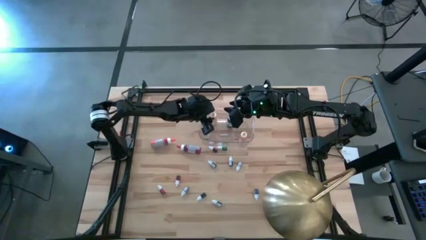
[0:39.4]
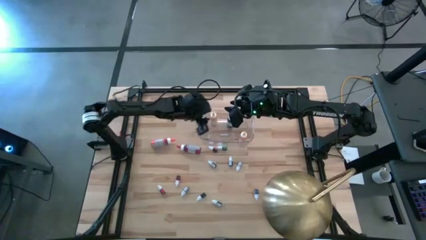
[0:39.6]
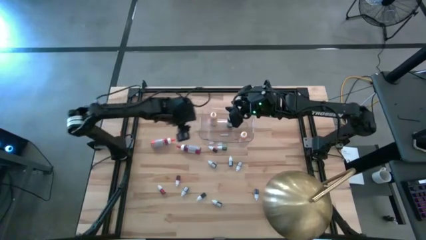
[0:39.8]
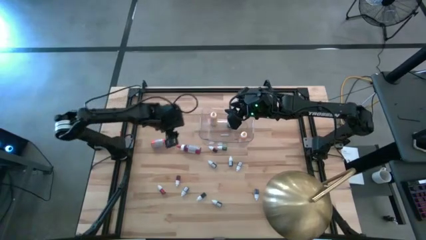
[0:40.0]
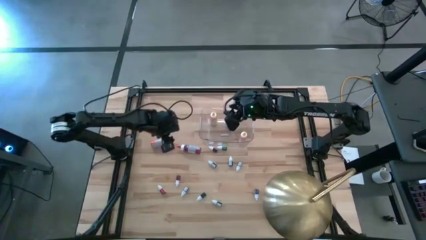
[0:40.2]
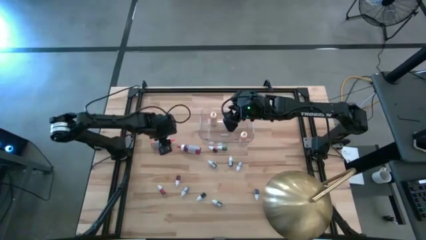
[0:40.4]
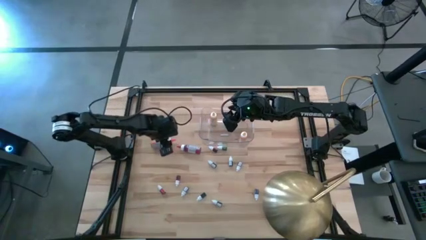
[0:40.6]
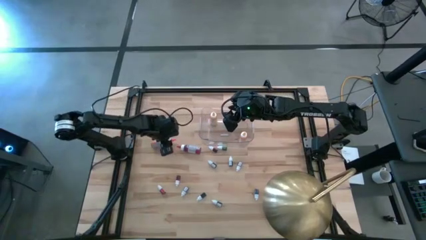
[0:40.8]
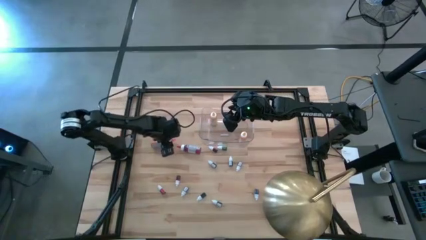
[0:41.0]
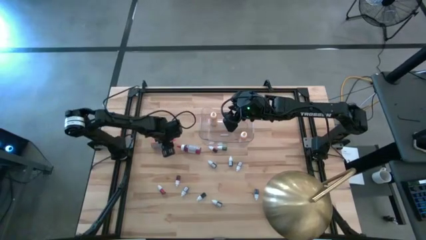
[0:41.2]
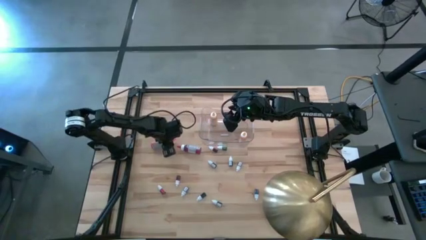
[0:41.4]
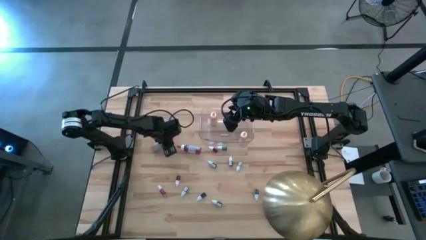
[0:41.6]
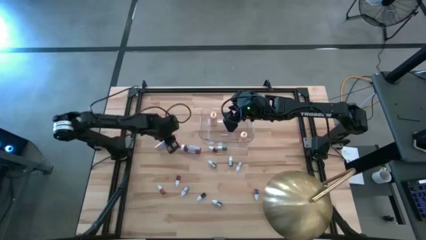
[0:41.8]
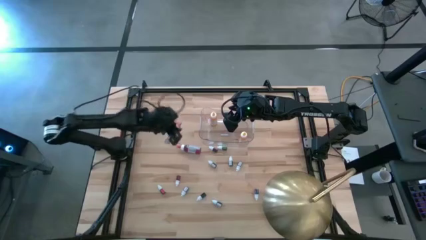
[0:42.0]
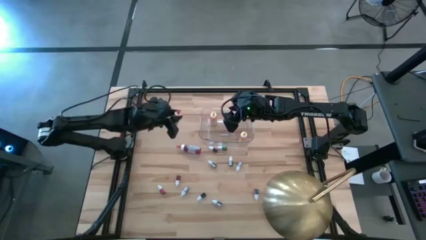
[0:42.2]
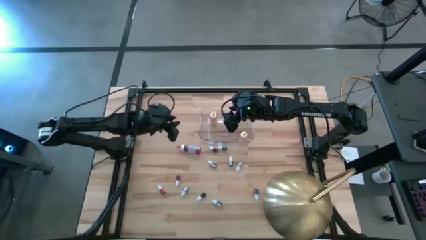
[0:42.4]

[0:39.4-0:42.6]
Task: Pick & Place food coloring
Put the large orange food coloring bottle in the transparent bin

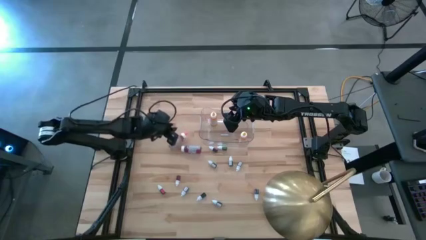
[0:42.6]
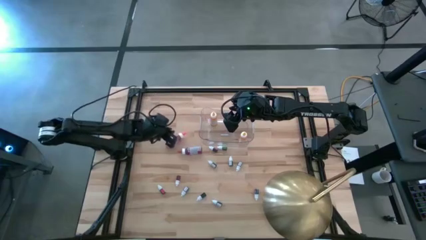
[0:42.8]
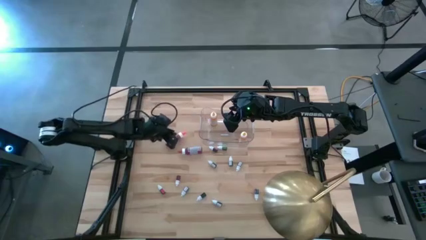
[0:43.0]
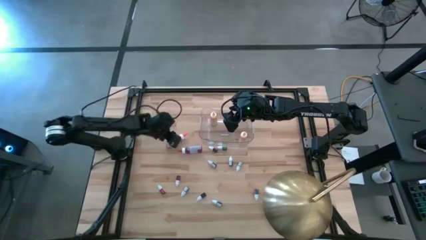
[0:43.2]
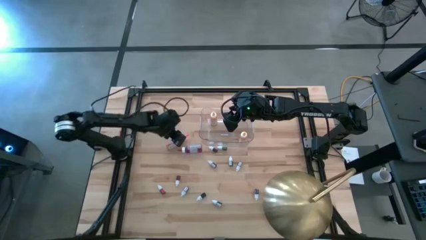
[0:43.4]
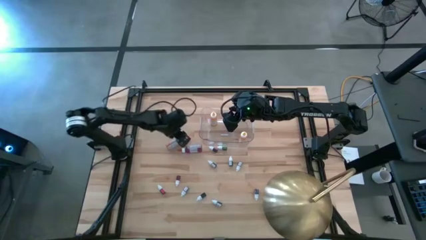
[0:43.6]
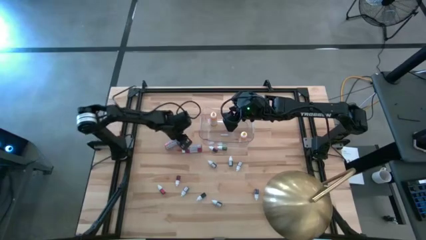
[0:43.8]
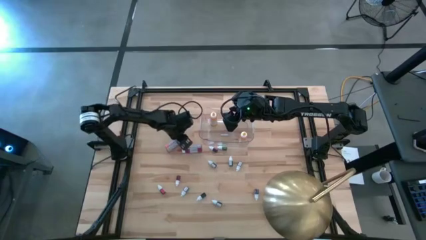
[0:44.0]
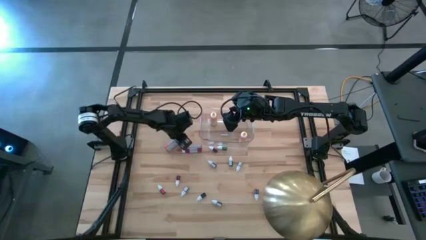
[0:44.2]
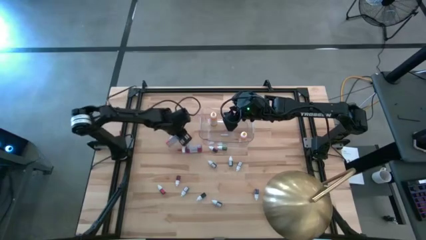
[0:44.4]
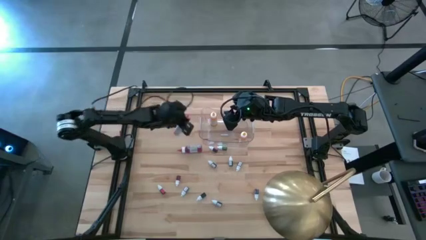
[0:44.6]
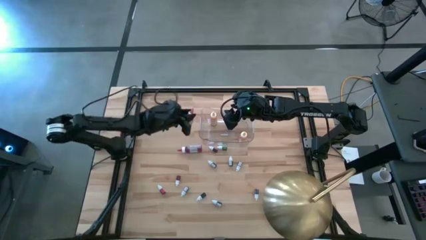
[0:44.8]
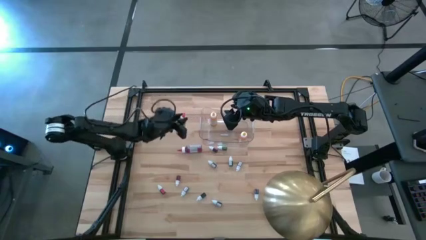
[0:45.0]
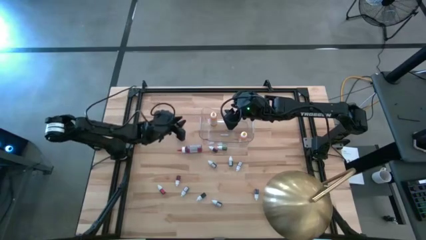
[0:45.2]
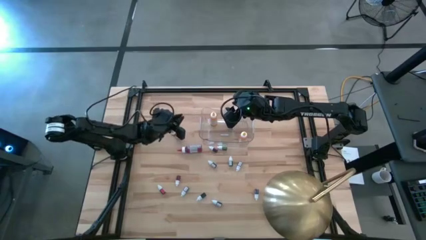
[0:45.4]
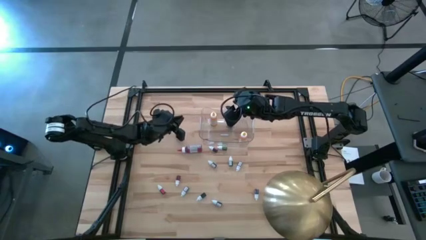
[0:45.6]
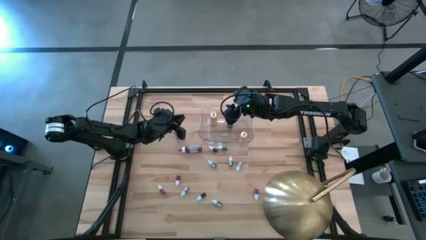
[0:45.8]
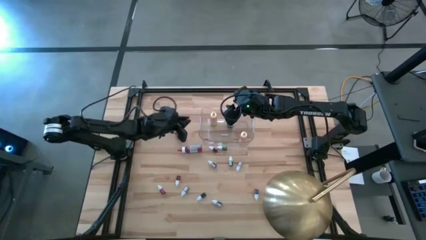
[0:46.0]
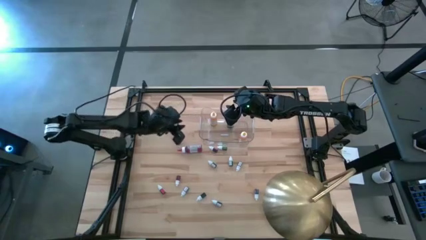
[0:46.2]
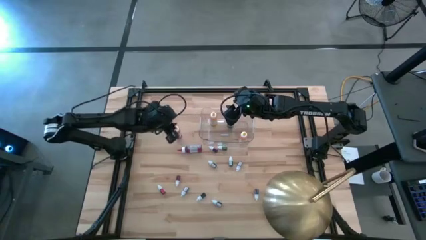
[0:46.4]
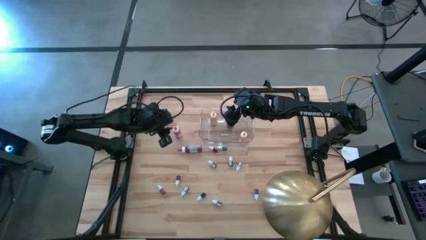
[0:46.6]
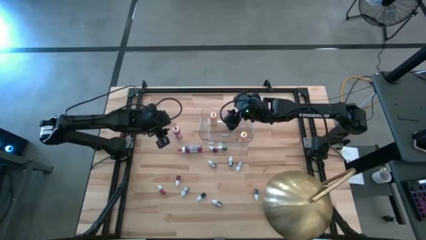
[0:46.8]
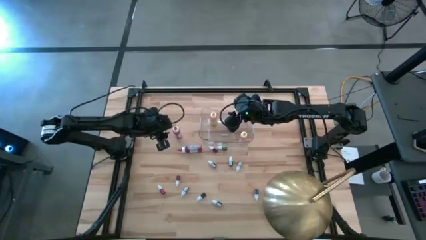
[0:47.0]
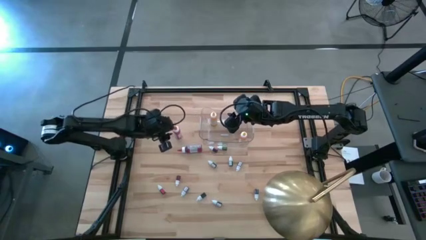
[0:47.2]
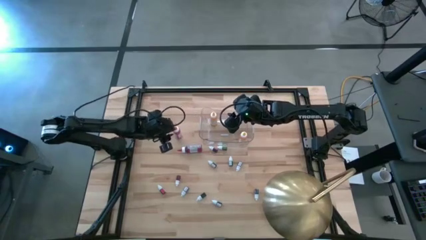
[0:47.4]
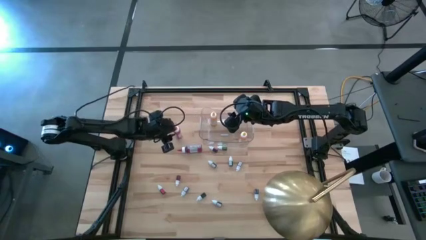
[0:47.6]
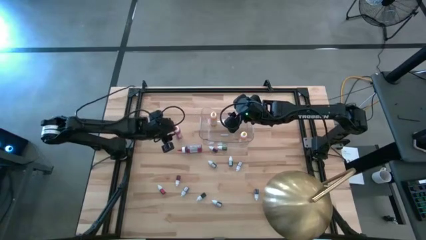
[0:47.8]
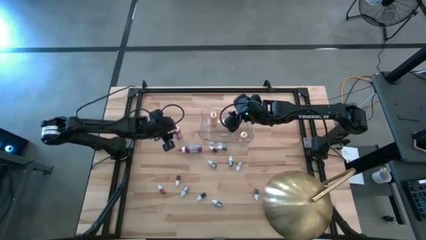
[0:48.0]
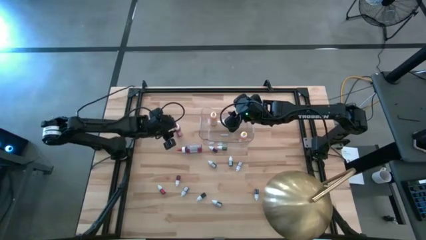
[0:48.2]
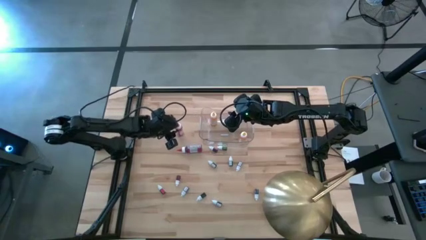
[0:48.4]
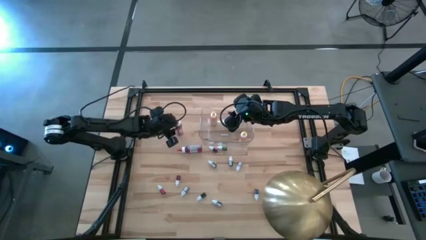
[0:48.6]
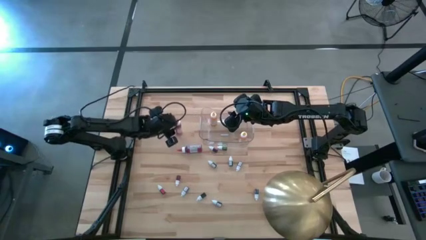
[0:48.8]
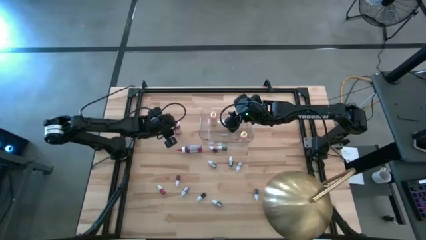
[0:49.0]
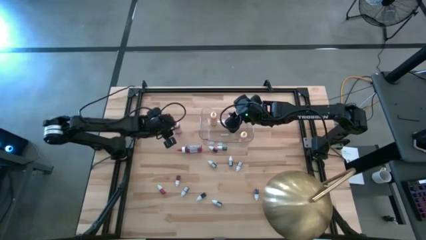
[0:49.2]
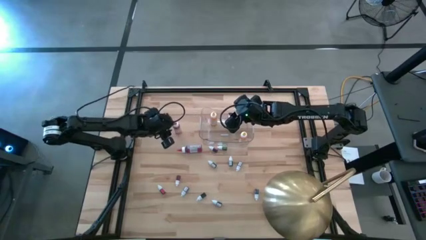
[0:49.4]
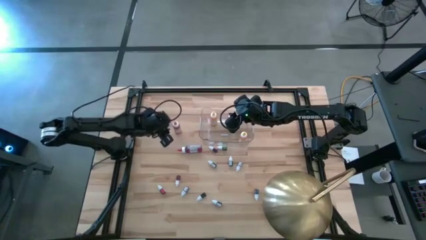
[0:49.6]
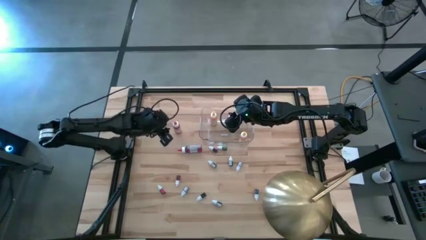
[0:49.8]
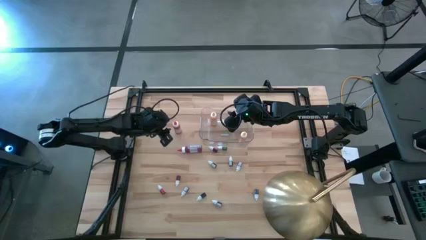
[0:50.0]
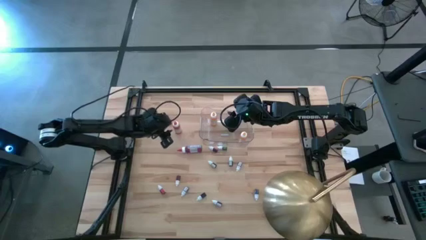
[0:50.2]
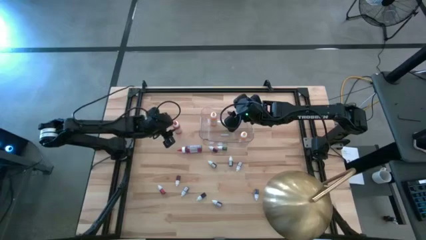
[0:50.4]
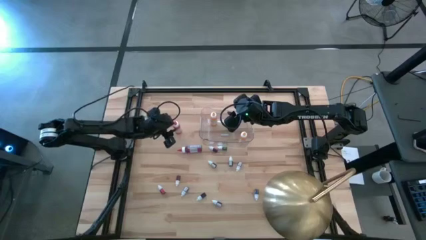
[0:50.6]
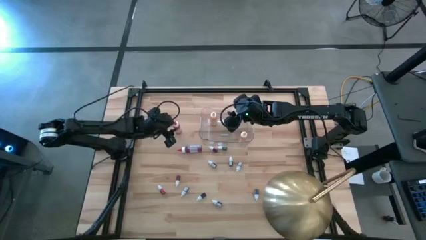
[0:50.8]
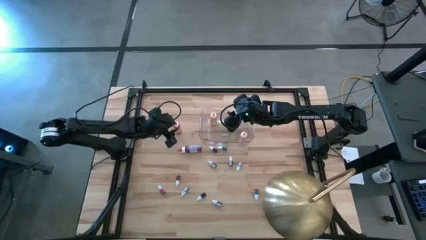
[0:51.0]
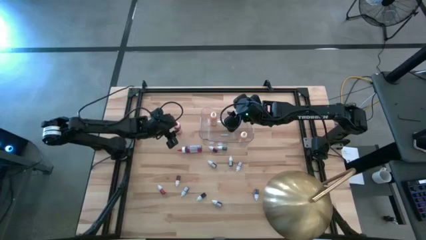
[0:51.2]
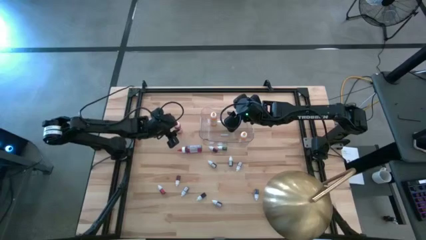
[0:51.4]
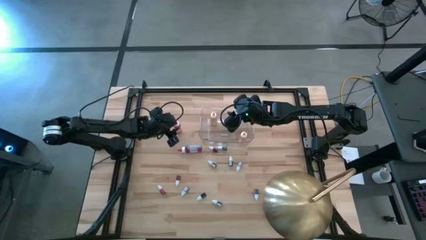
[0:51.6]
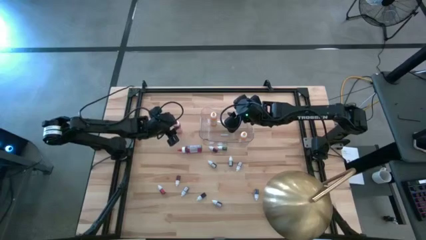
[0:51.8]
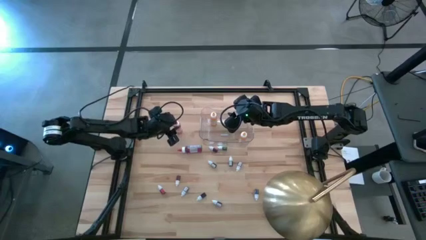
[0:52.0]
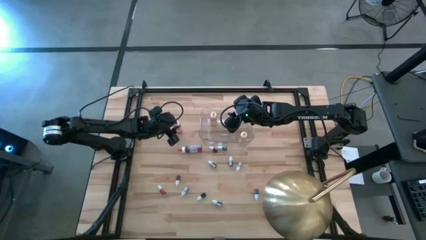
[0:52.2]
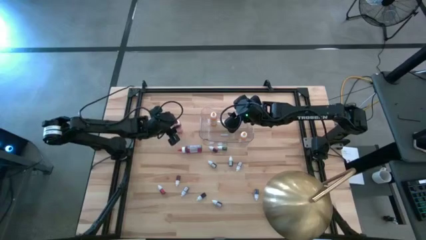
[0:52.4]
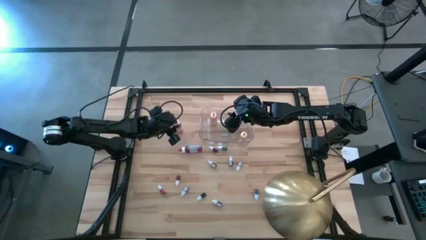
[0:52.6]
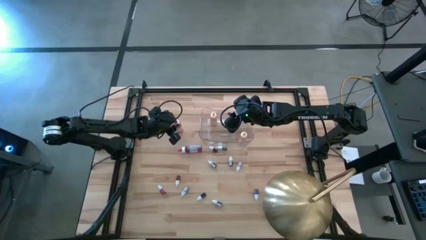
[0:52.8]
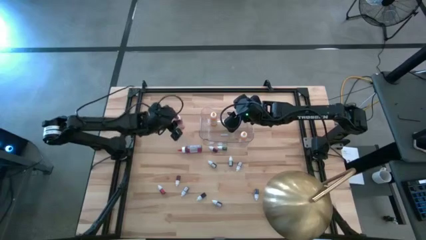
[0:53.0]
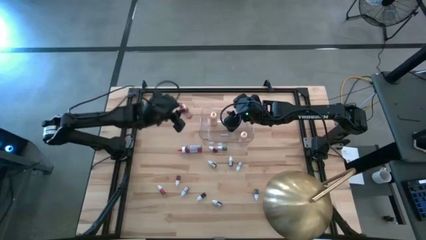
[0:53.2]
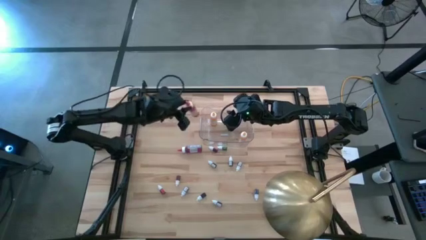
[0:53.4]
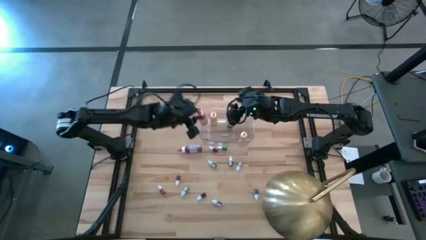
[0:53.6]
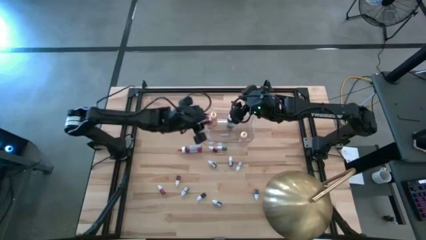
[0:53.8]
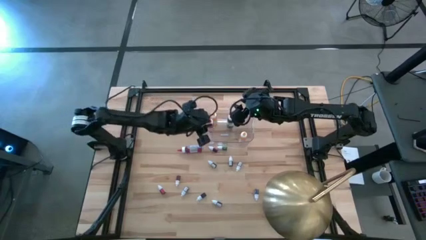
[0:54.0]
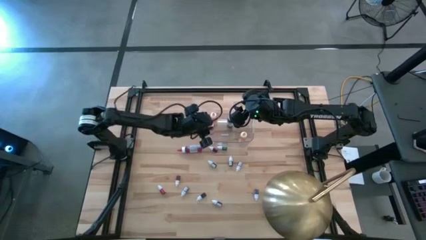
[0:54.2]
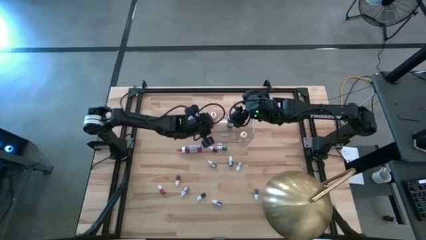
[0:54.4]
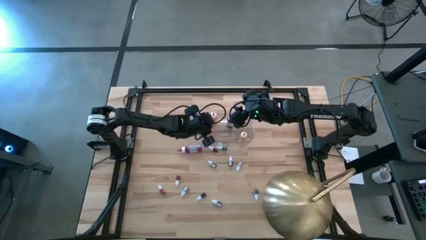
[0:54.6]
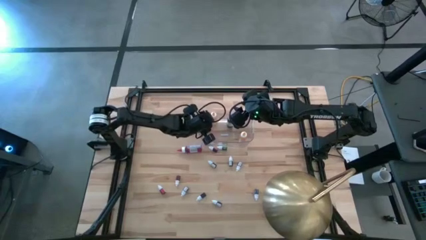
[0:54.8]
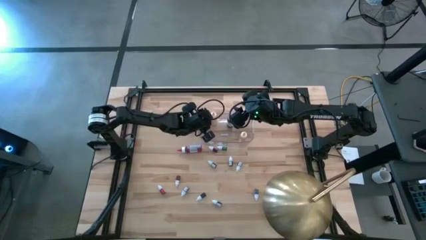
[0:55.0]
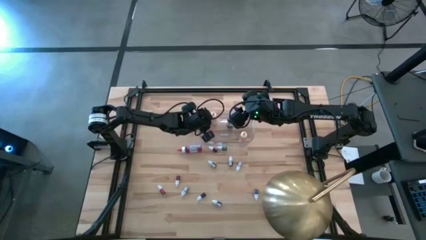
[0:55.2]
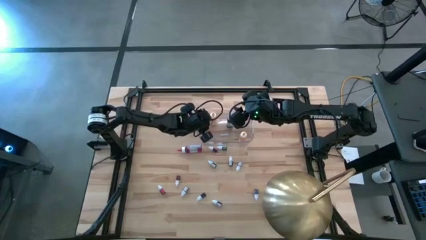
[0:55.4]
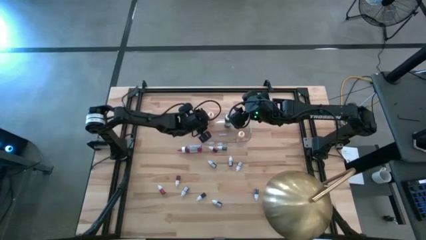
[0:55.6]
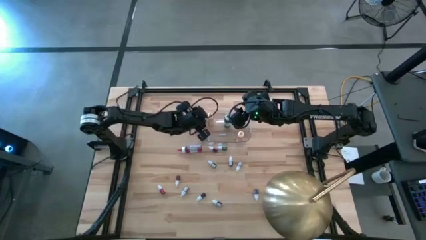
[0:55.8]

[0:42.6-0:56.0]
Put the large orange food coloring bottle in the transparent bin
